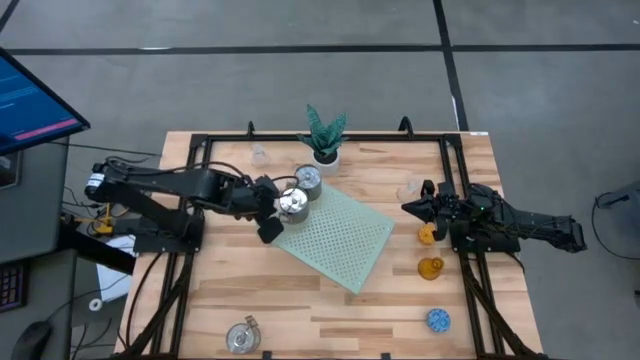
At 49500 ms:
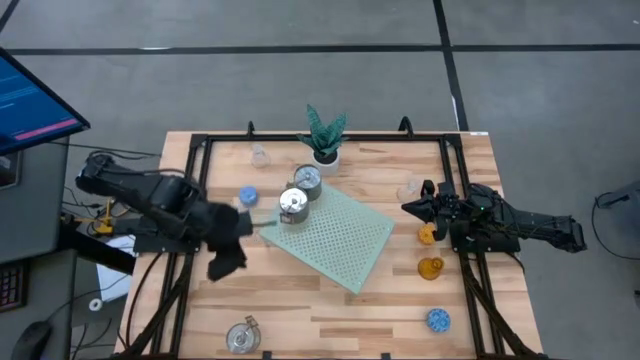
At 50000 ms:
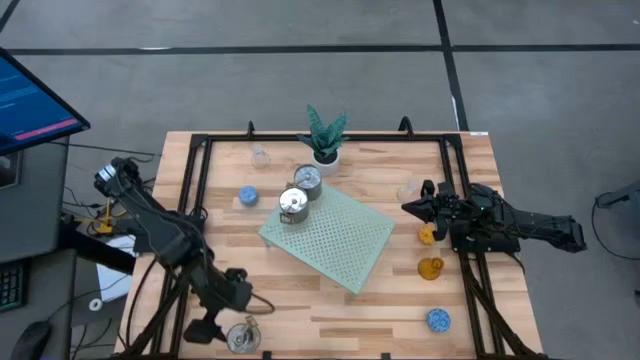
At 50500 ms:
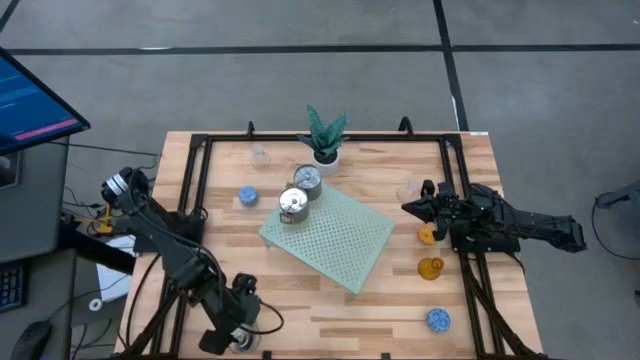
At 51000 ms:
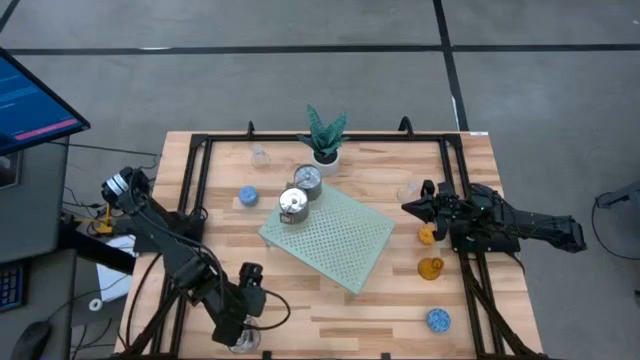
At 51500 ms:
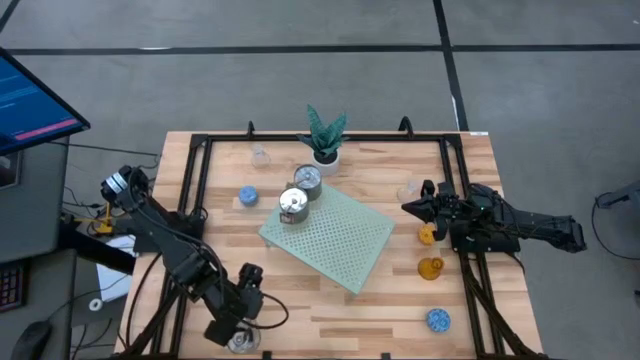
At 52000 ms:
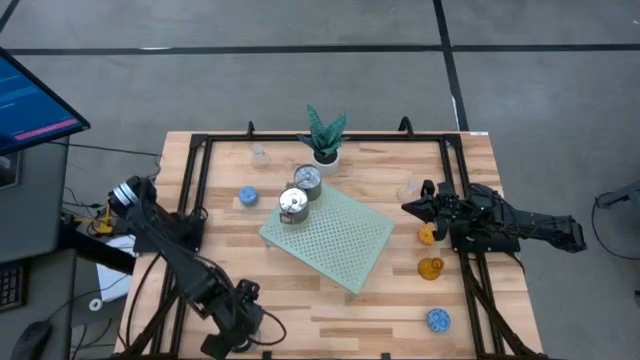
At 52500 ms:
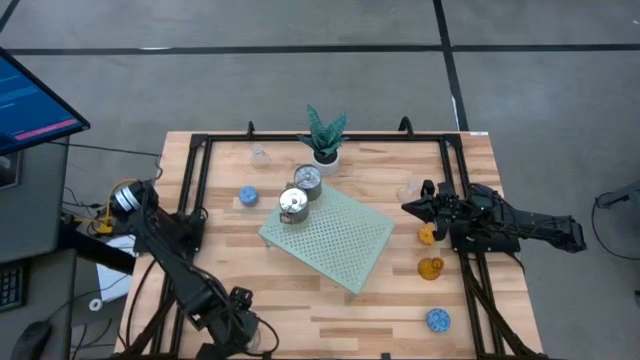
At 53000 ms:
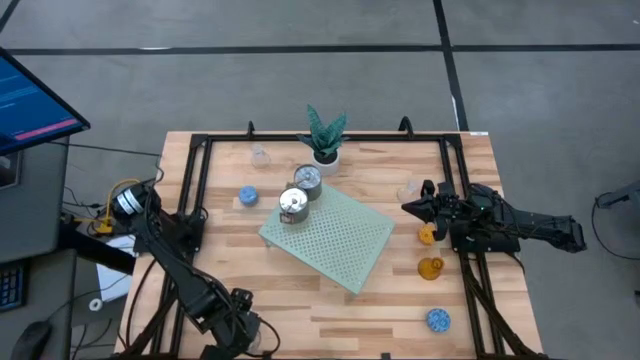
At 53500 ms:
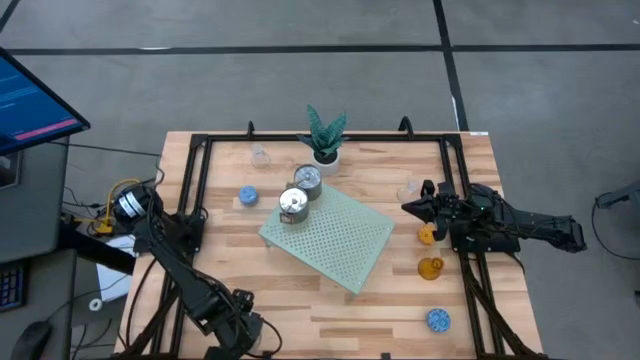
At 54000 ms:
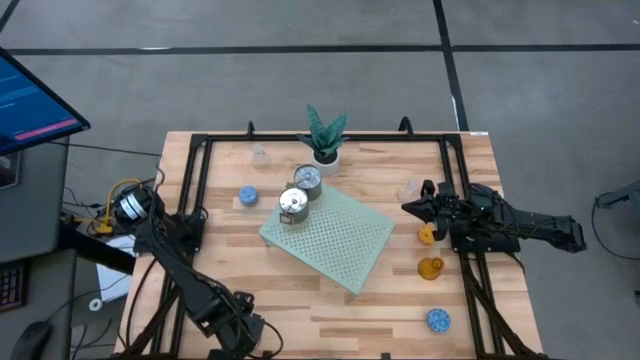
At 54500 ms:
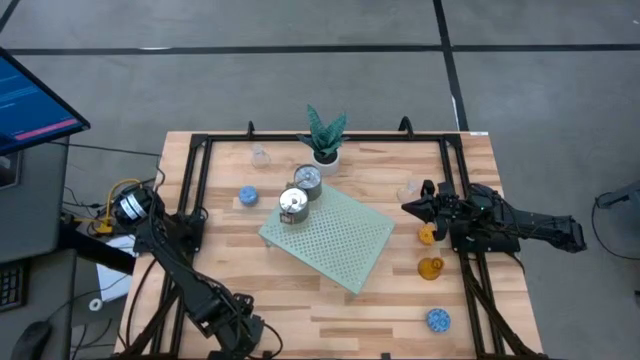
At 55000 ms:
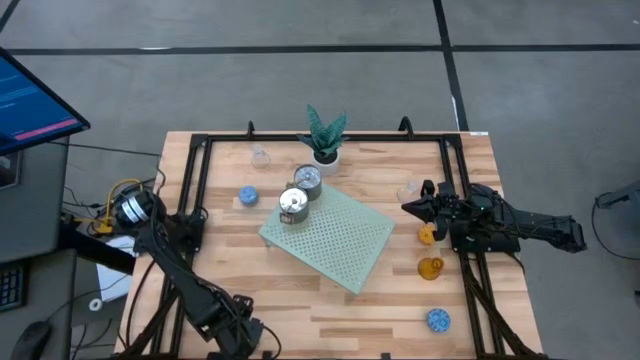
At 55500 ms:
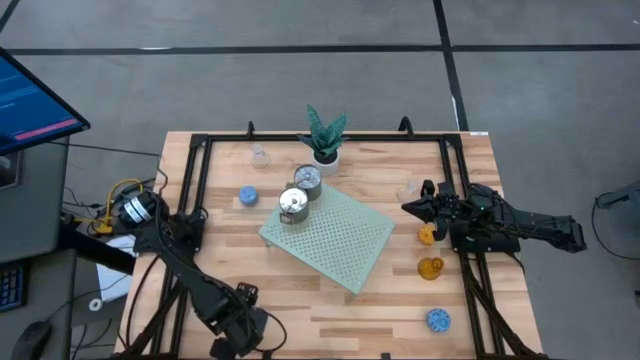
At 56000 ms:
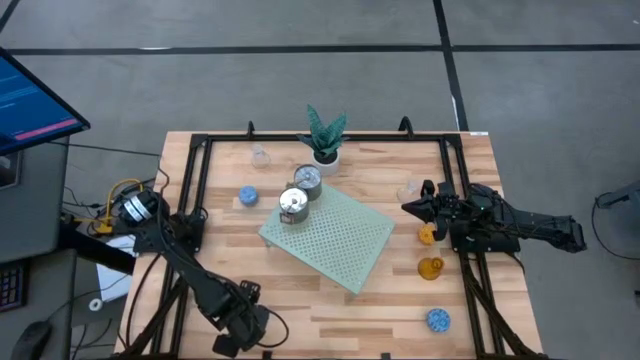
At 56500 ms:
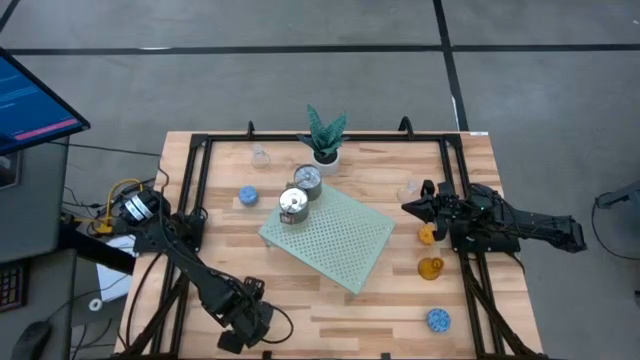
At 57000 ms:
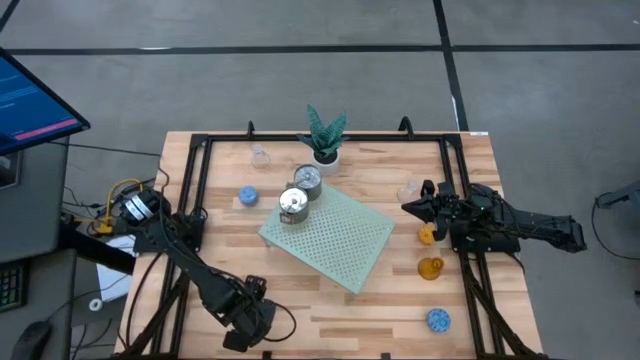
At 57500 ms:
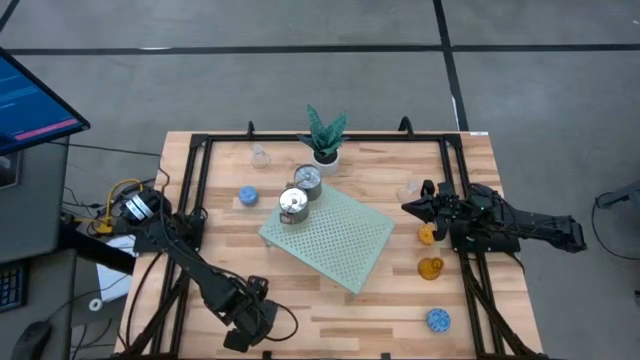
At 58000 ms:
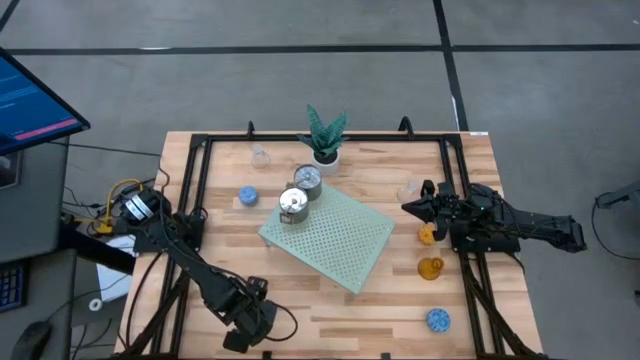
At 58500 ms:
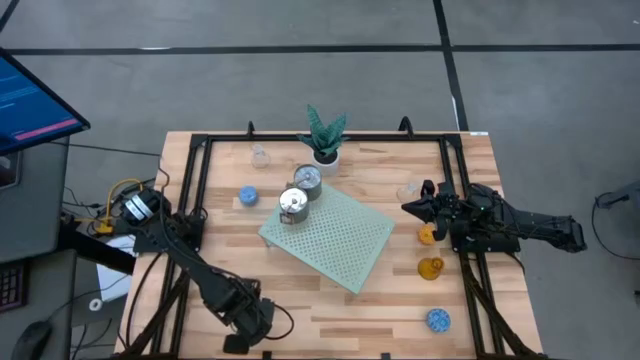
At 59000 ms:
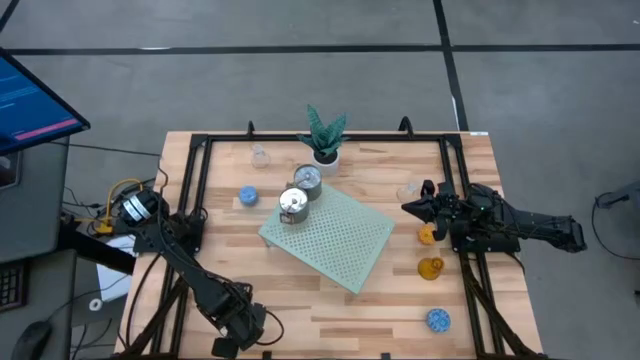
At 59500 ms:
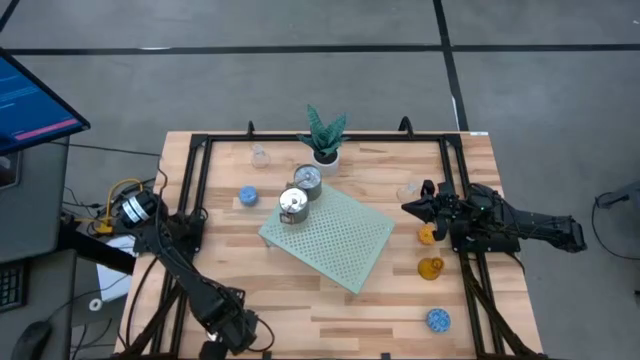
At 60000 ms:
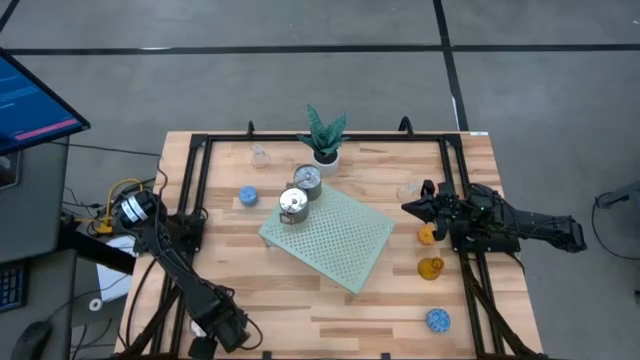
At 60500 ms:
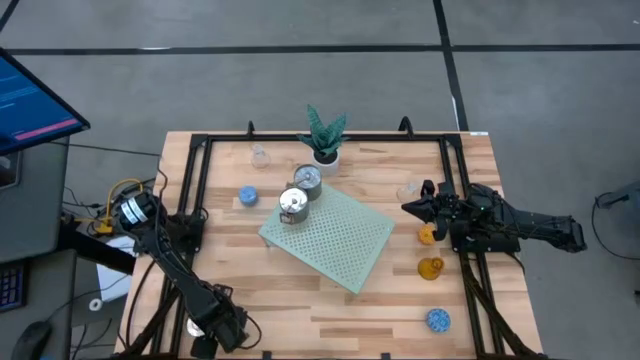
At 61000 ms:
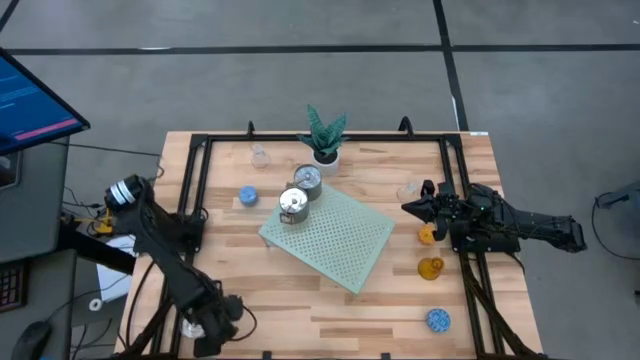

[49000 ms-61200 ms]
Task: Pick & Place candle stick holders
Put the silver scented candle on the shelf

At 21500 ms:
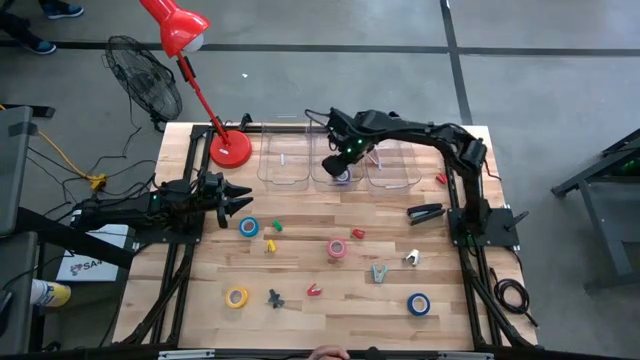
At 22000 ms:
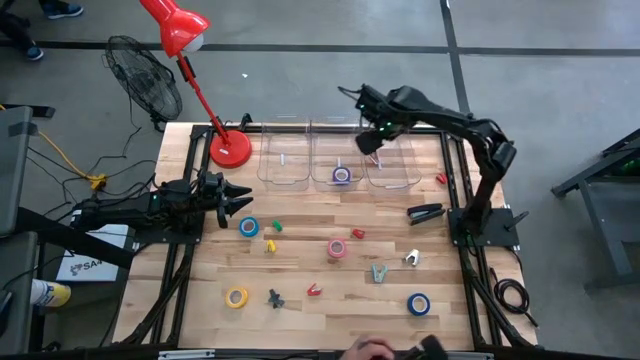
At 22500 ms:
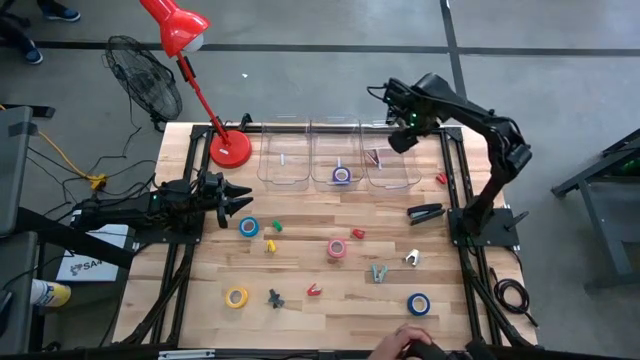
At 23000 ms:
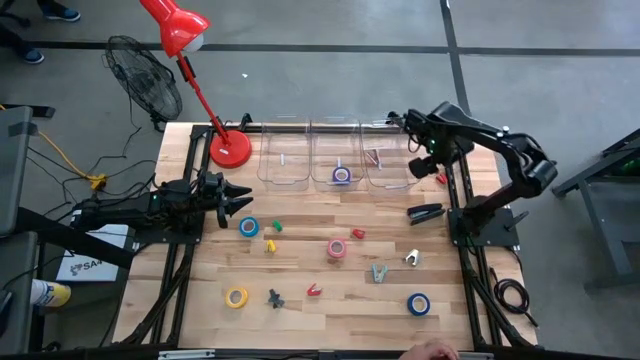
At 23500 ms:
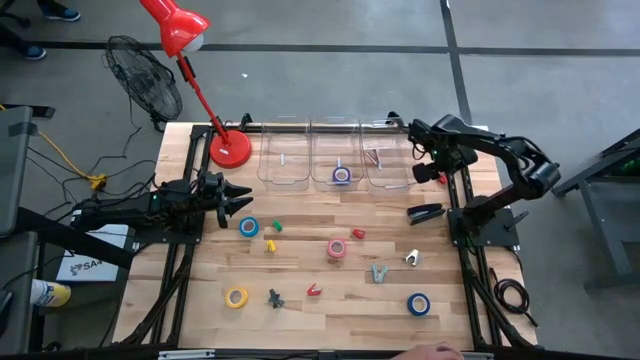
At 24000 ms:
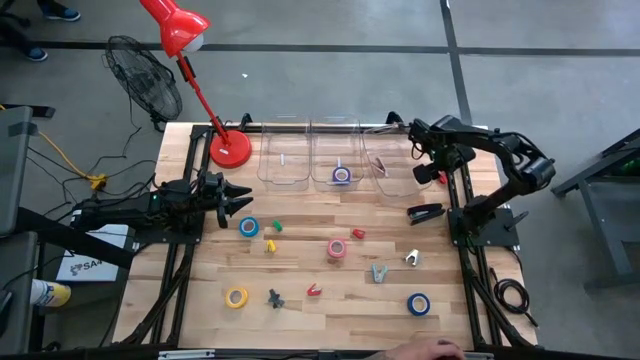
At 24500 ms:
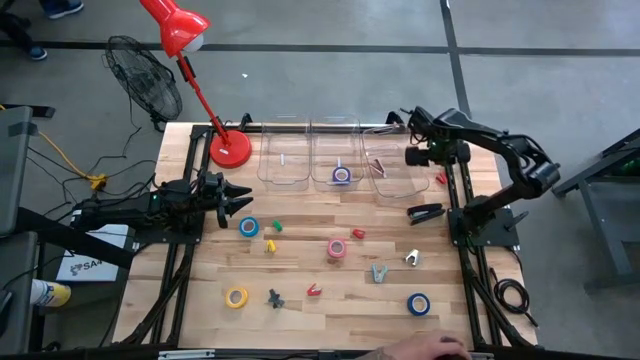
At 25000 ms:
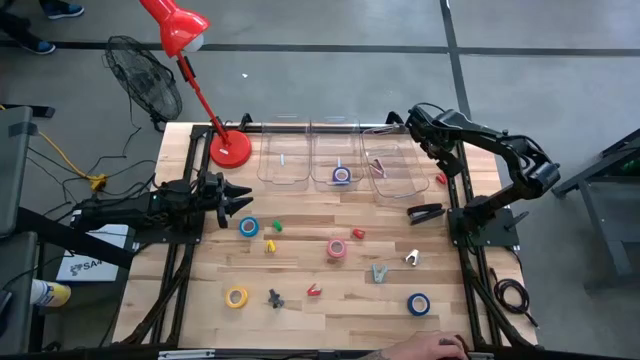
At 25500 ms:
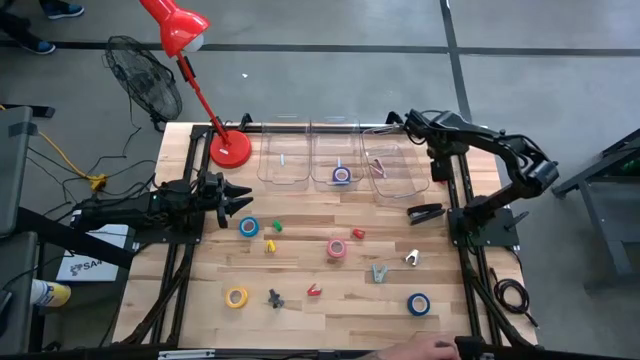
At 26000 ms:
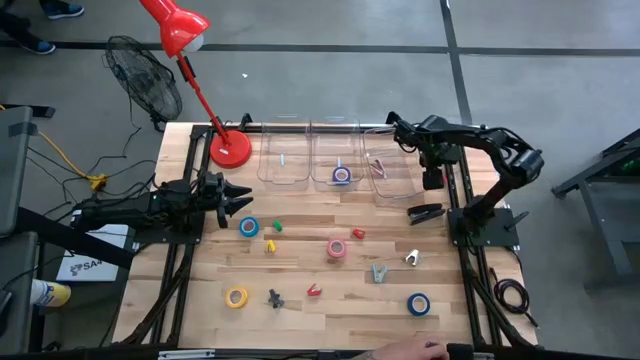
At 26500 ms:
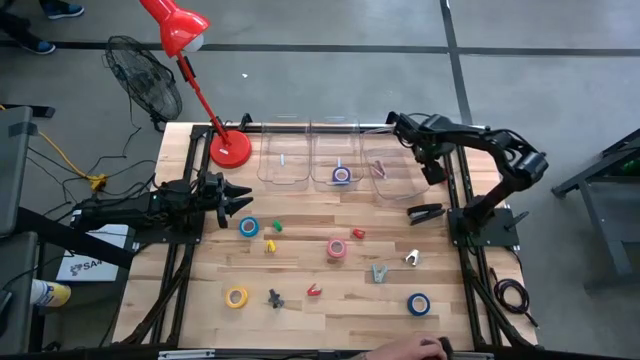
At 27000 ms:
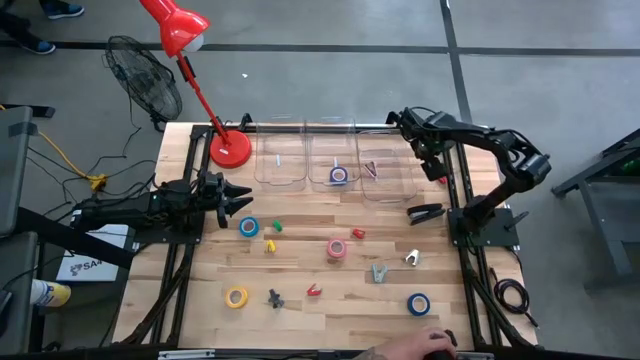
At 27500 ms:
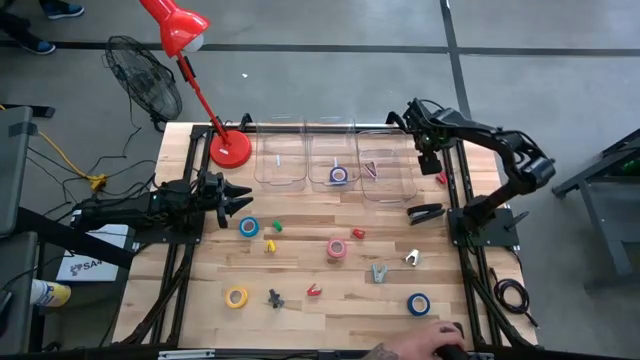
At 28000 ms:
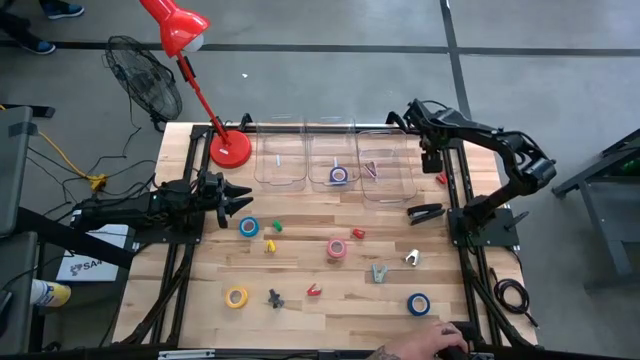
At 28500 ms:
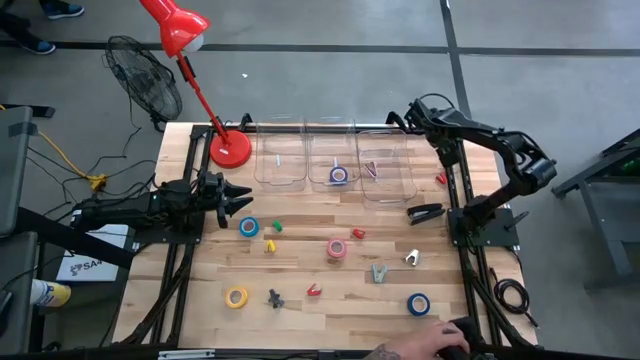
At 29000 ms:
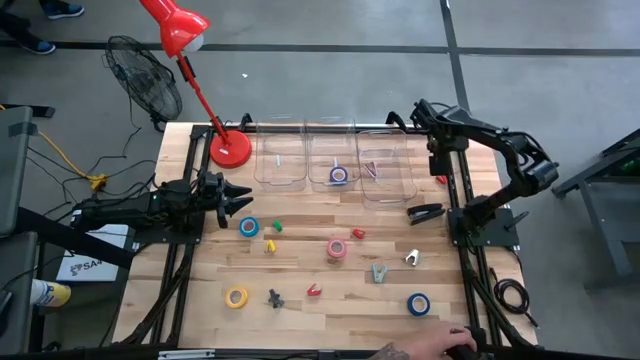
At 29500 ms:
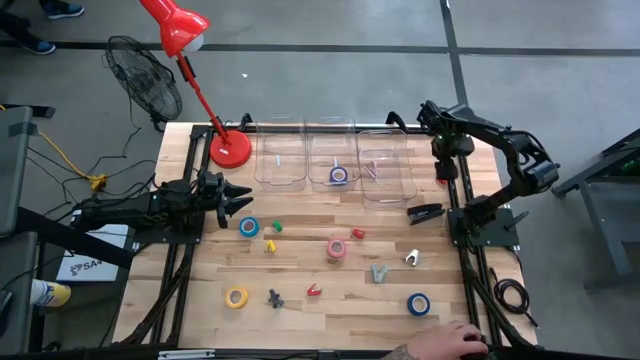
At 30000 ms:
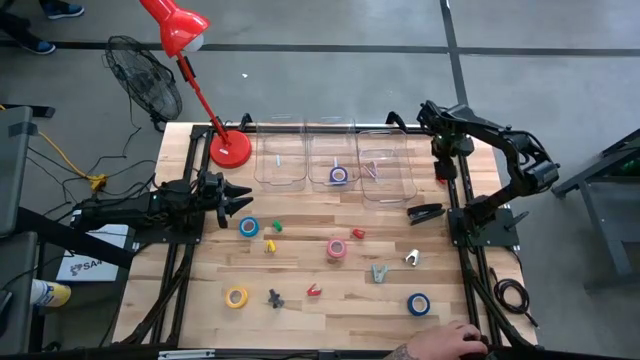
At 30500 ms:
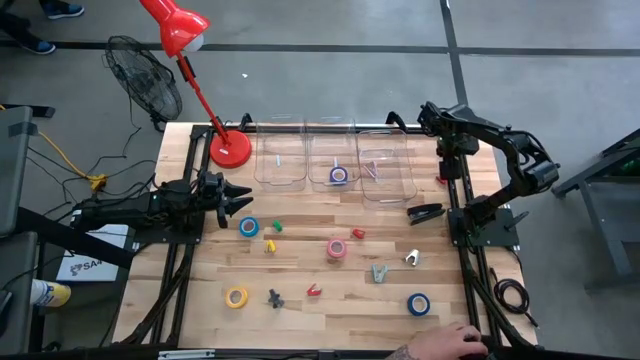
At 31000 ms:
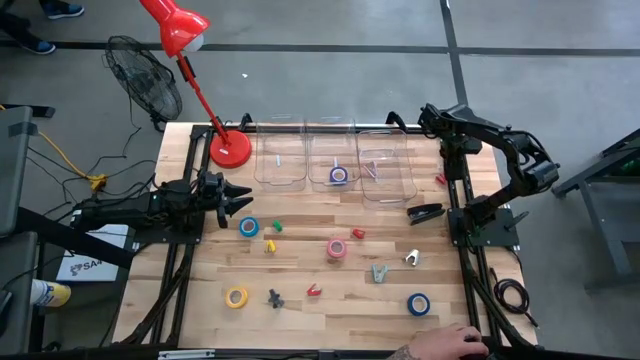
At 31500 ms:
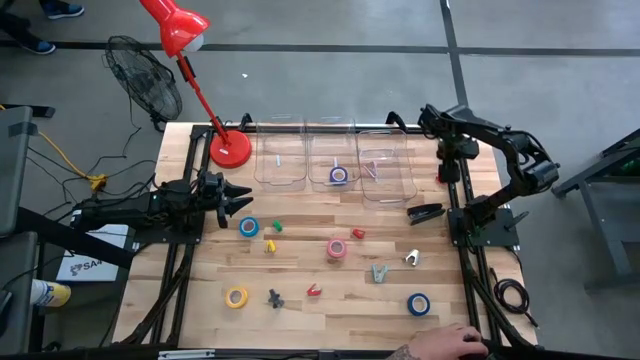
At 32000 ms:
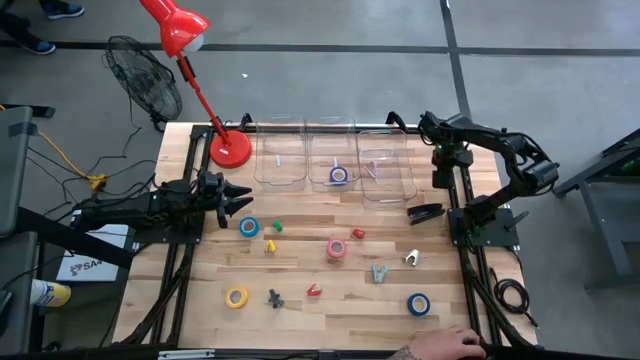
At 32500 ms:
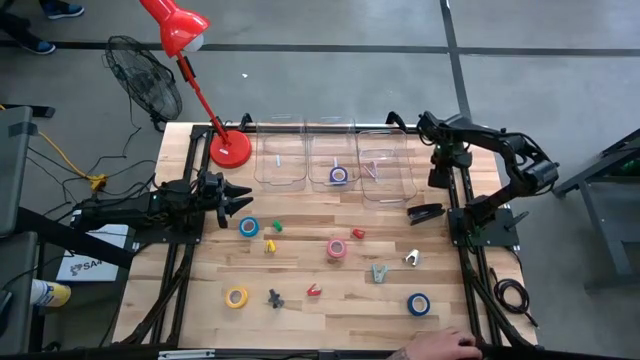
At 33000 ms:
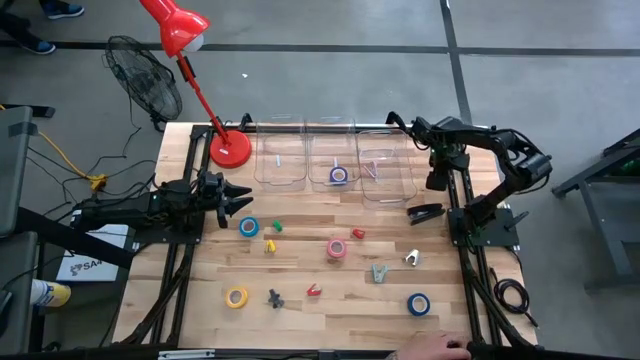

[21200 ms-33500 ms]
Task: Pick and place Stapler, Stapler remover, tape
Put the top right red stapler into the left transparent bin
